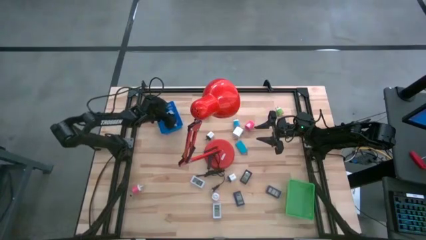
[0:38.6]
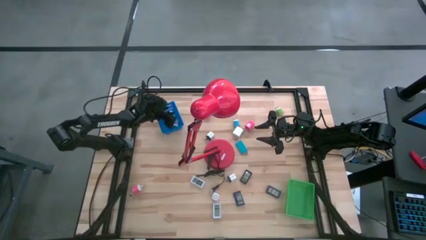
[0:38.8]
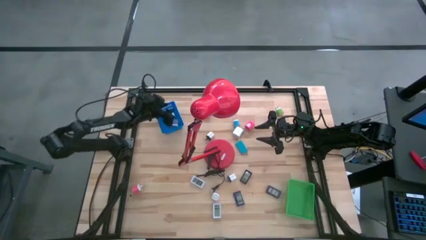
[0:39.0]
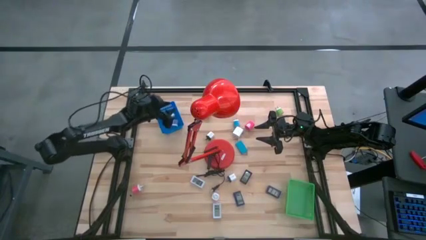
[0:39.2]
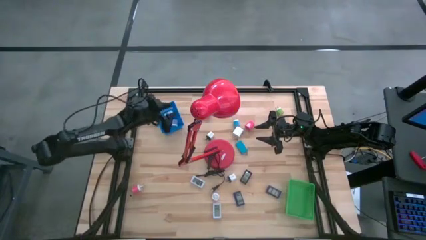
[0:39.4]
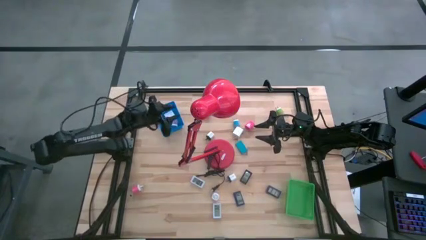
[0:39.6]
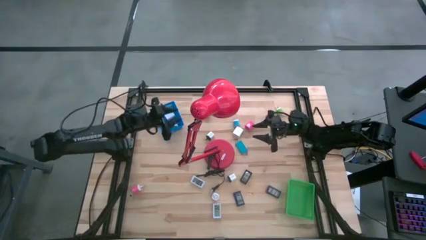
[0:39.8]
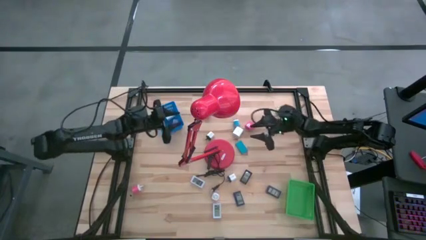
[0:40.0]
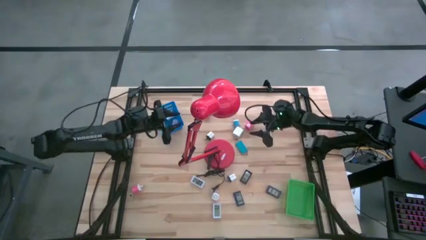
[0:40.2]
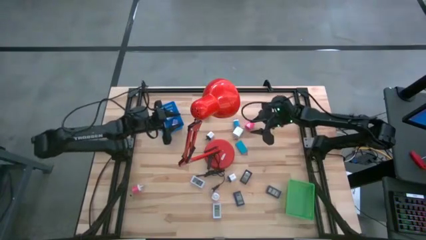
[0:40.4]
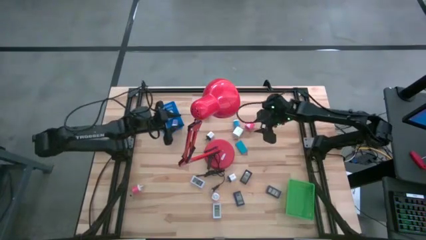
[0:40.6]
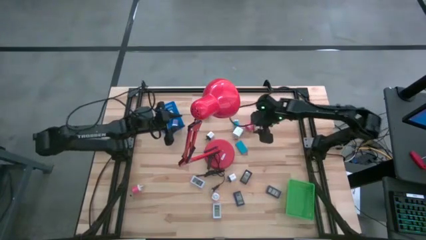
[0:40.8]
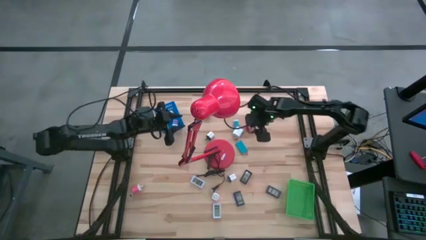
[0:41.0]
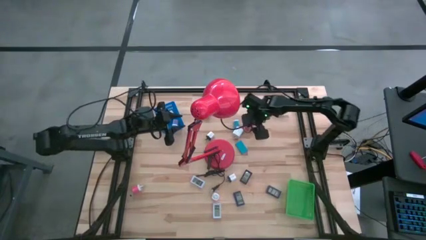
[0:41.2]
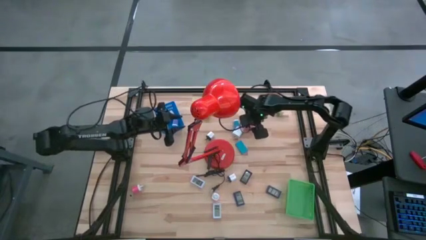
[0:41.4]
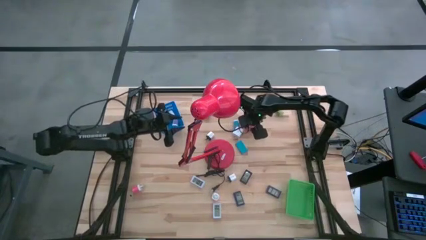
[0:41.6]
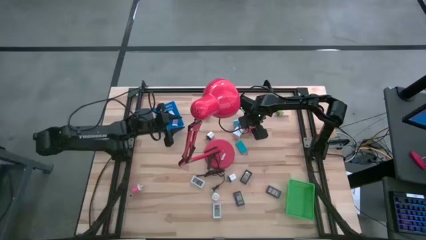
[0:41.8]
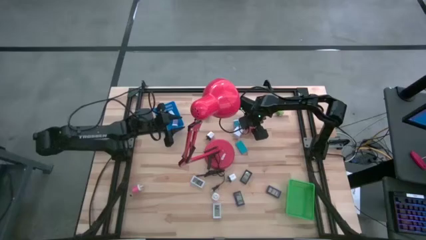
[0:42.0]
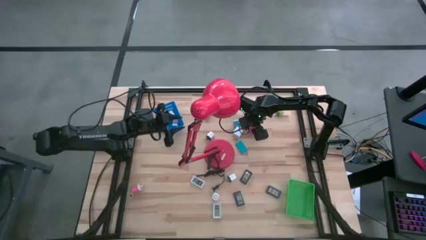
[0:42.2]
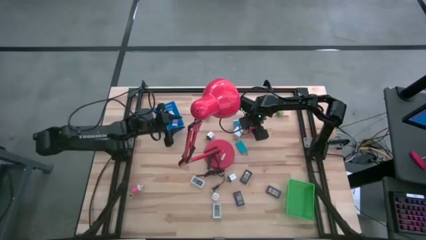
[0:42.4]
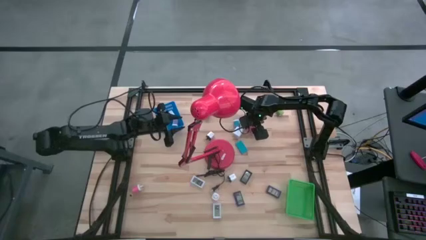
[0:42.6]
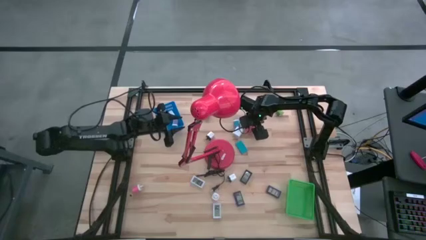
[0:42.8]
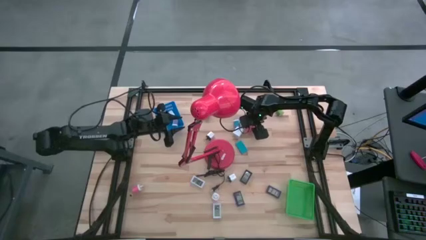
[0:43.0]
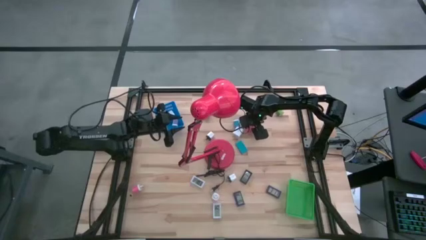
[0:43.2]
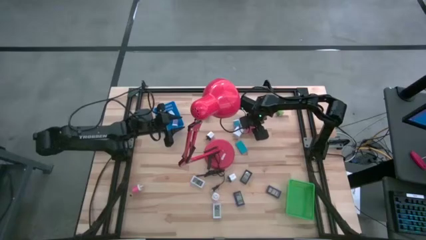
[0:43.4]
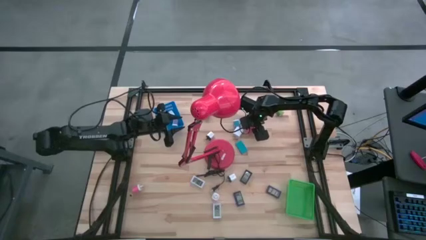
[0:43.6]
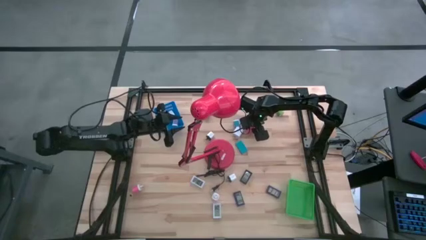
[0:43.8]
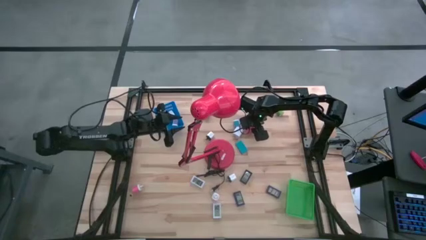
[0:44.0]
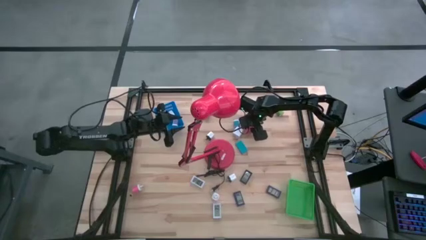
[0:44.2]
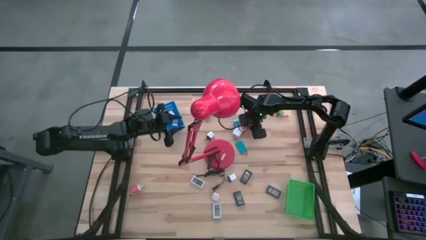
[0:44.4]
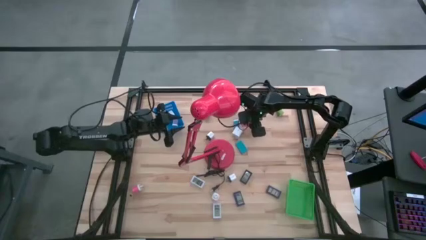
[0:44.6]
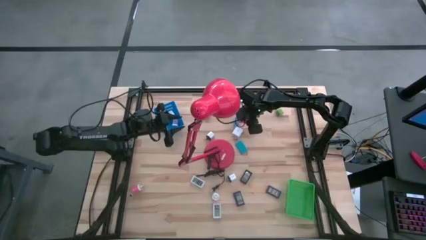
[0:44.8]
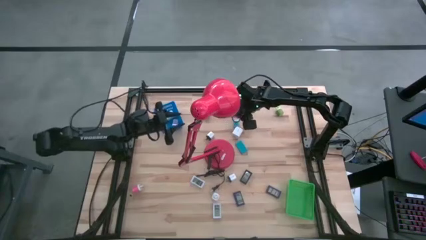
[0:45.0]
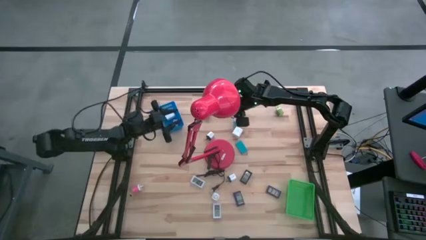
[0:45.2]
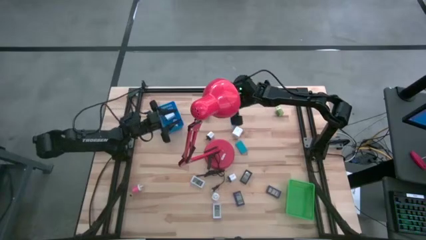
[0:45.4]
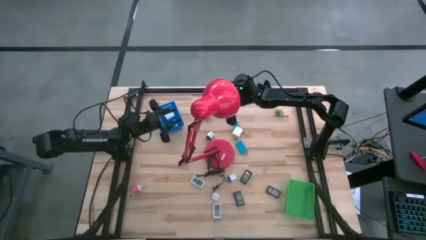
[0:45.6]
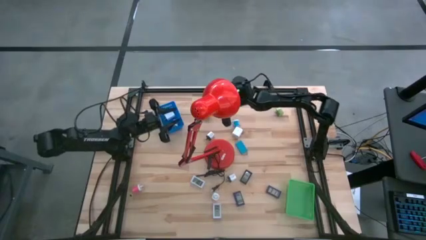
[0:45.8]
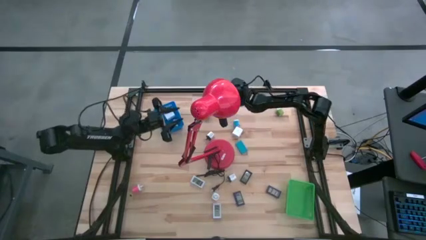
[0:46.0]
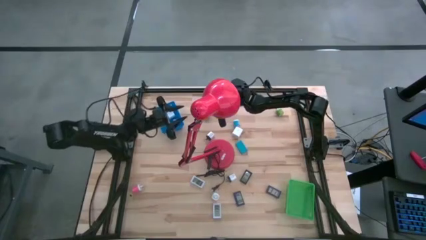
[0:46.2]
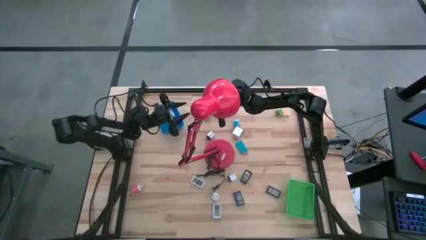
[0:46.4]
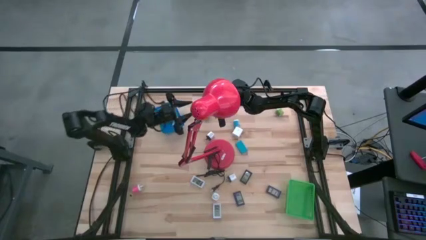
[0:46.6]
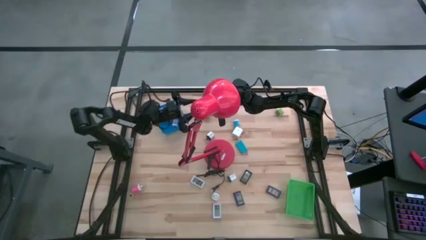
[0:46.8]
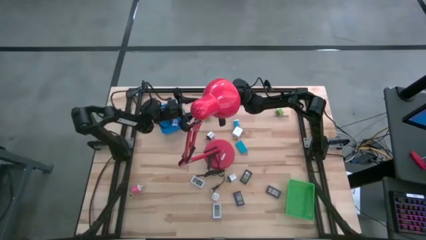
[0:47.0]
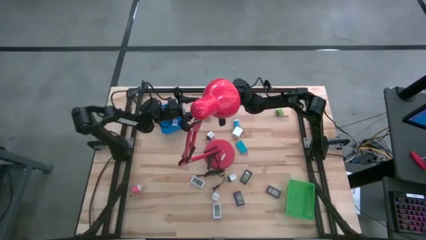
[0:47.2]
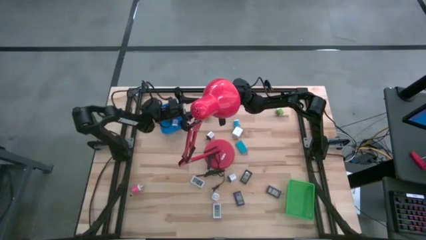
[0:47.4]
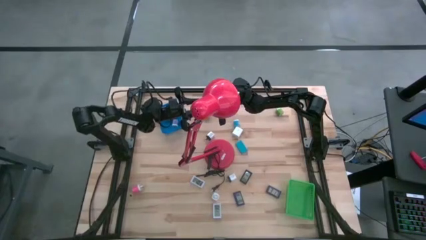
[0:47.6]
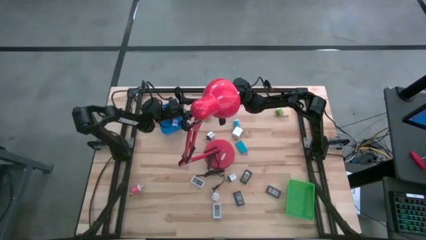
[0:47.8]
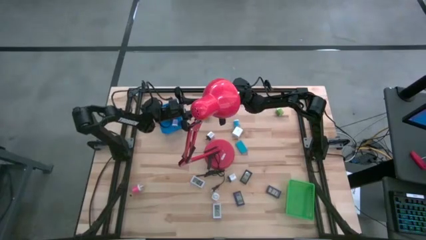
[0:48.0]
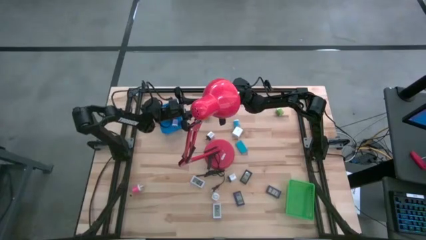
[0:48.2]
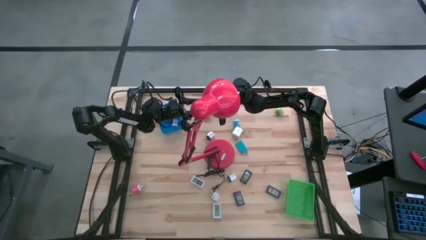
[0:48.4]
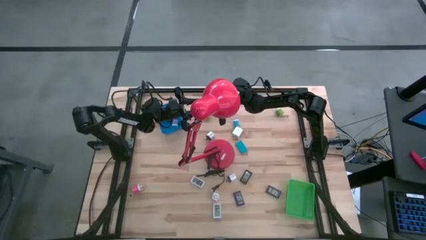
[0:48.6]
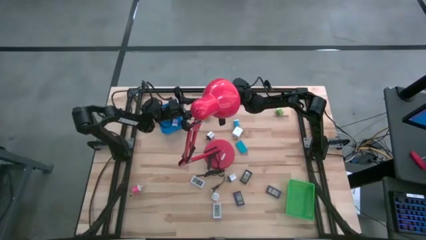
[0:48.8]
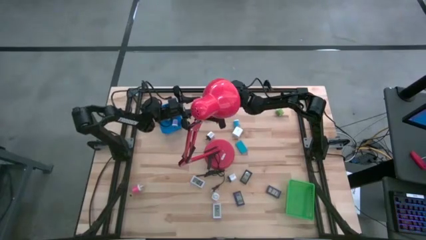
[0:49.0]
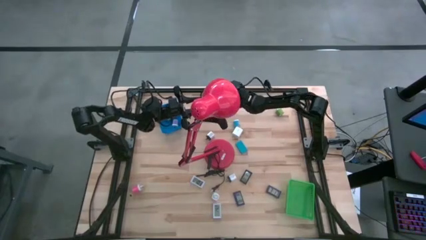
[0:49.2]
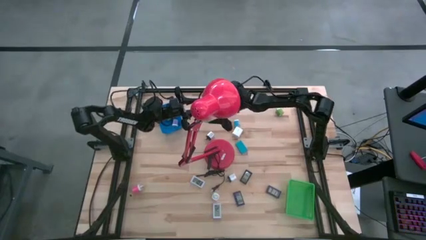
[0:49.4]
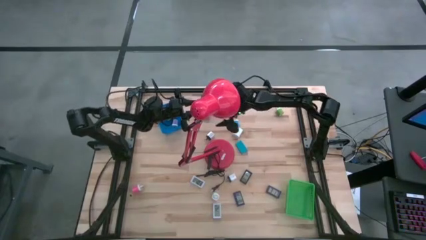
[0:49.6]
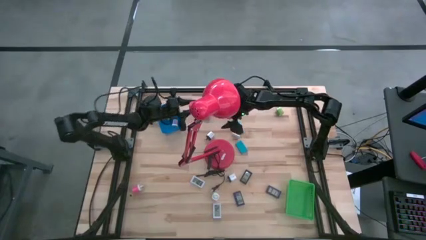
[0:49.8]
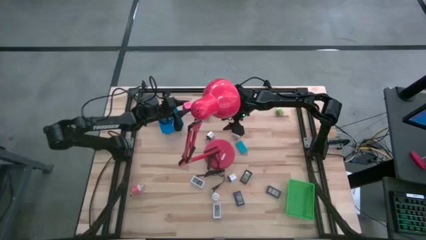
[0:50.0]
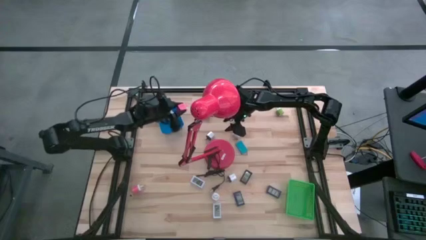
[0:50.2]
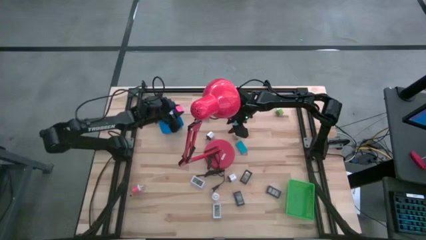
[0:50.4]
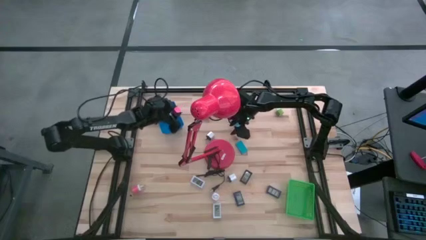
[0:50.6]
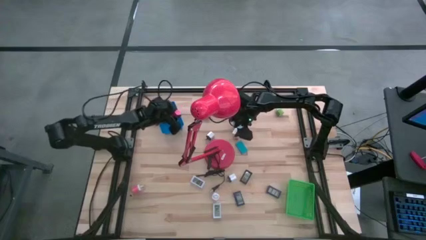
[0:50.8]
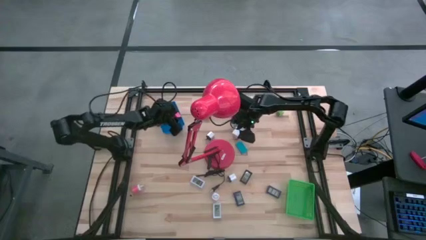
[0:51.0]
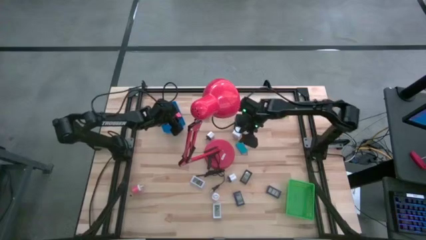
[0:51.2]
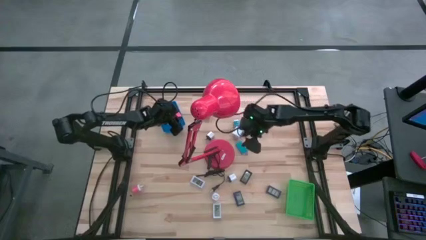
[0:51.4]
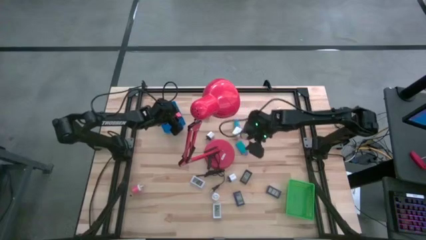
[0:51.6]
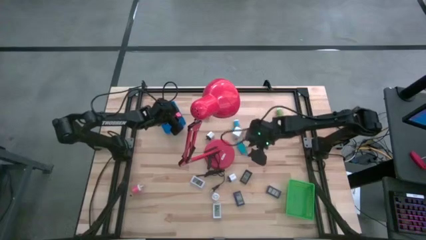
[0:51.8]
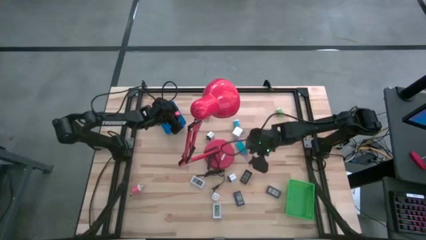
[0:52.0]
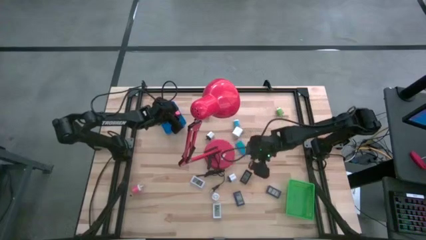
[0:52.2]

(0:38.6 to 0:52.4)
Task: Pick & Place Office items
Put the pink charger adapter into the blue bin
